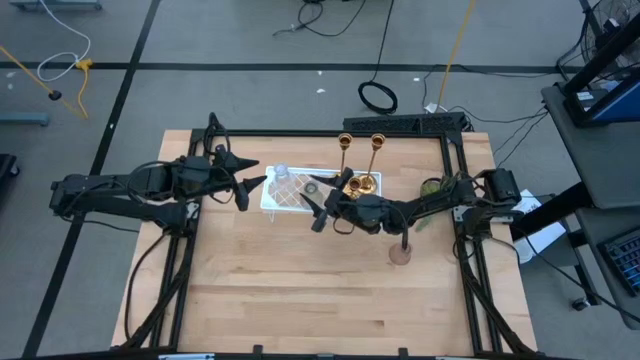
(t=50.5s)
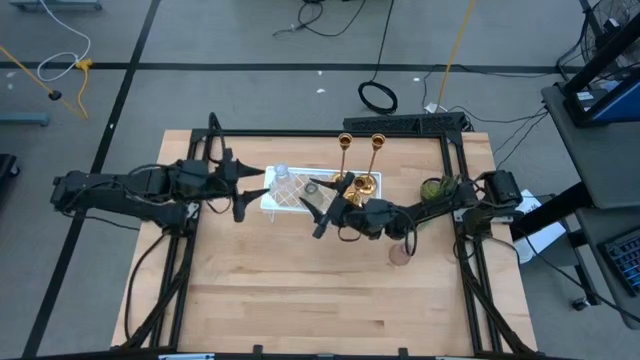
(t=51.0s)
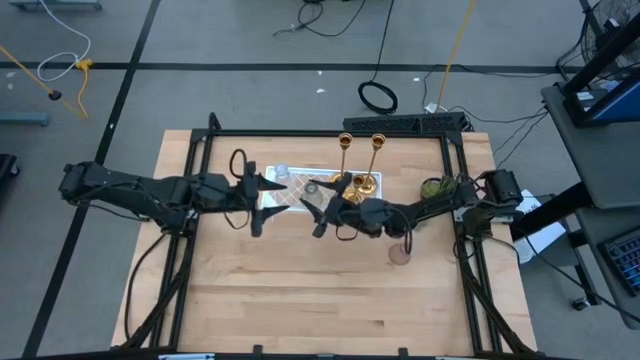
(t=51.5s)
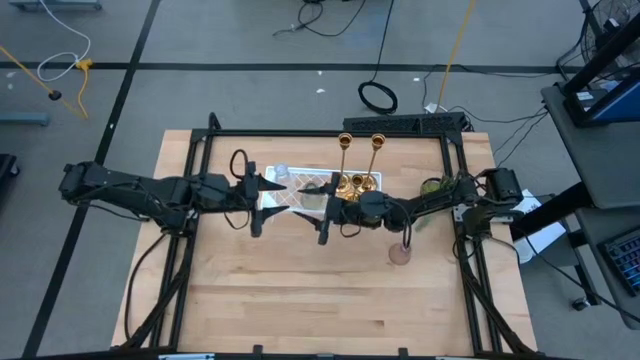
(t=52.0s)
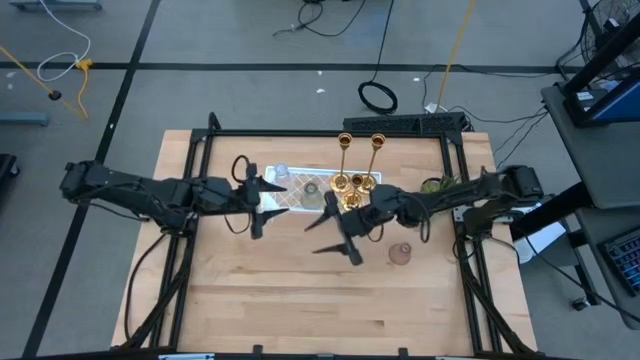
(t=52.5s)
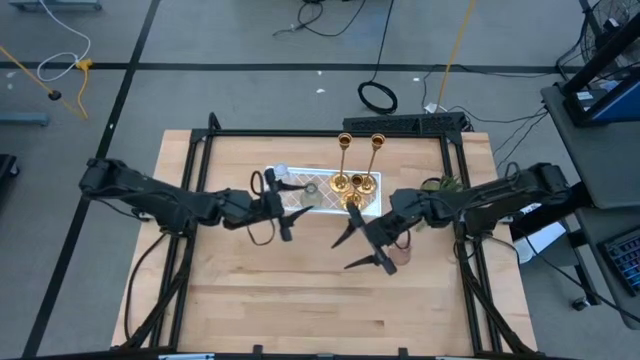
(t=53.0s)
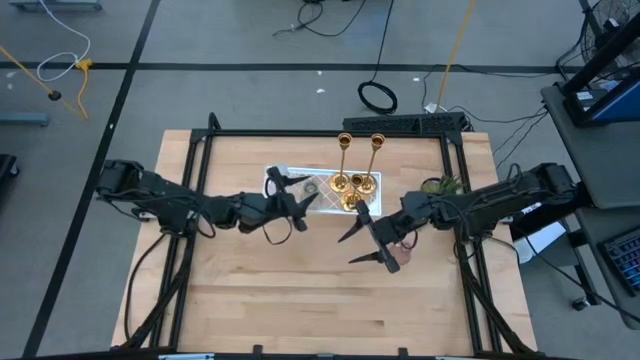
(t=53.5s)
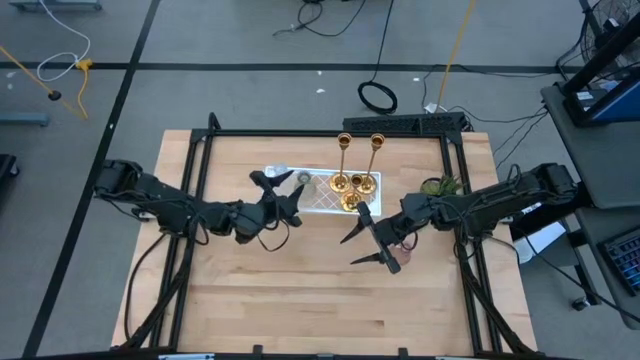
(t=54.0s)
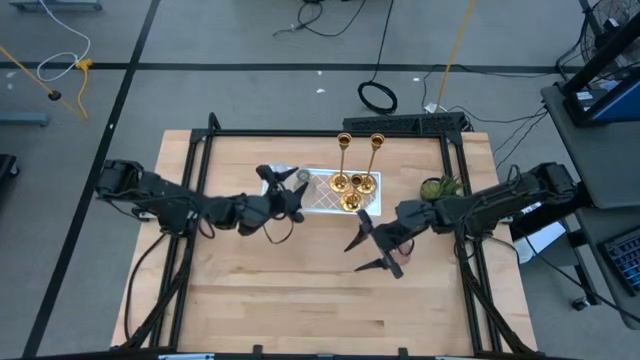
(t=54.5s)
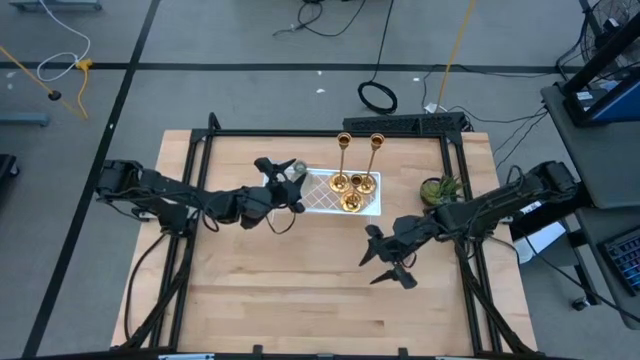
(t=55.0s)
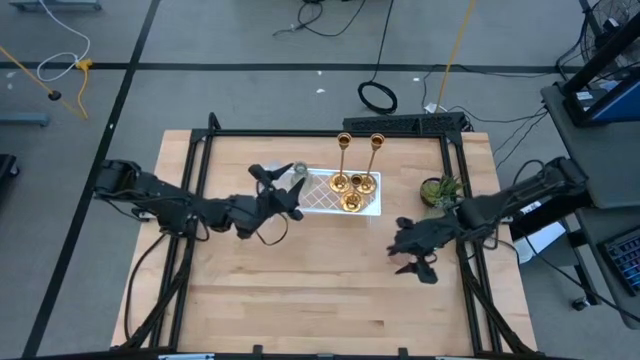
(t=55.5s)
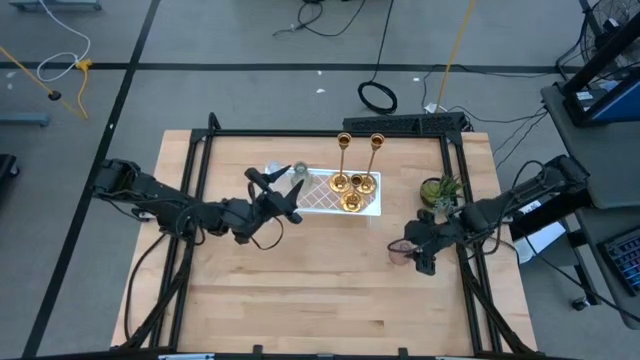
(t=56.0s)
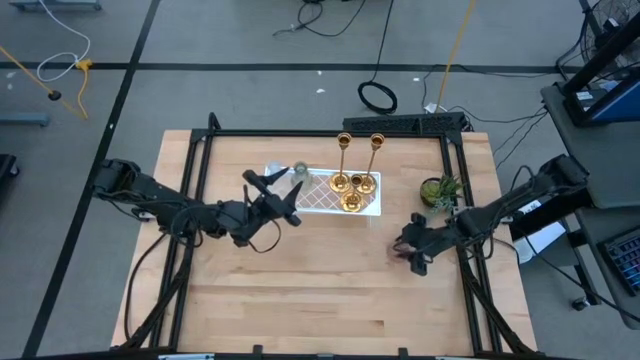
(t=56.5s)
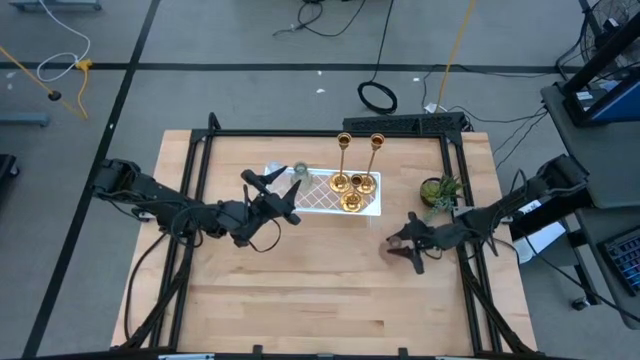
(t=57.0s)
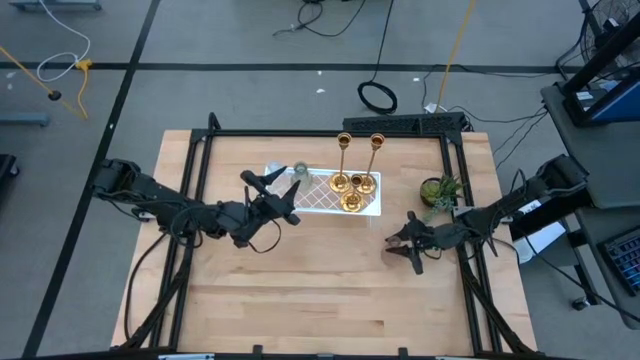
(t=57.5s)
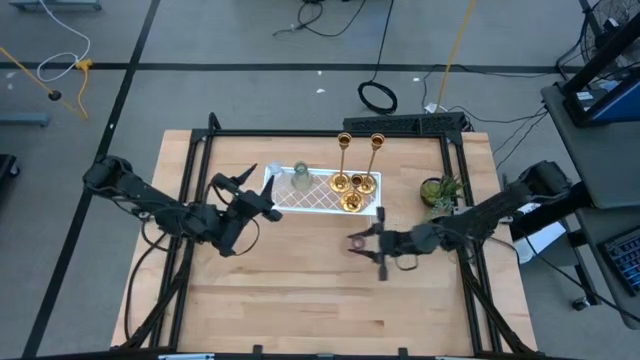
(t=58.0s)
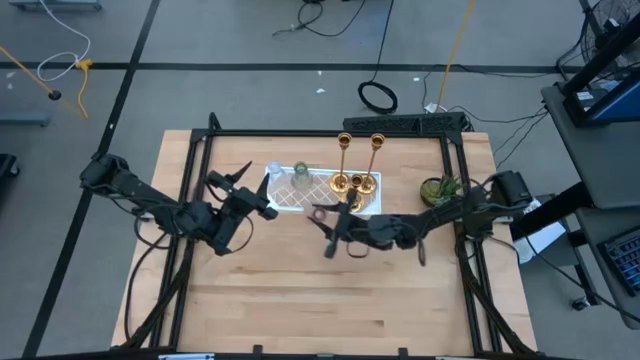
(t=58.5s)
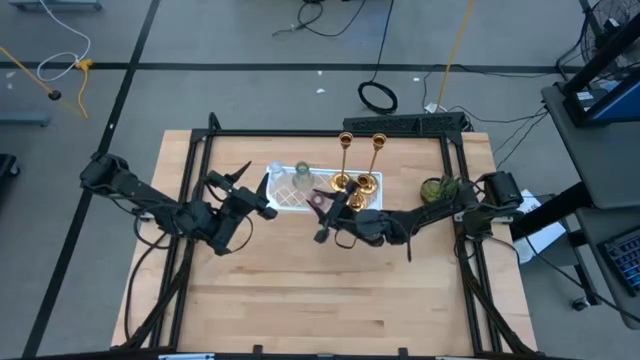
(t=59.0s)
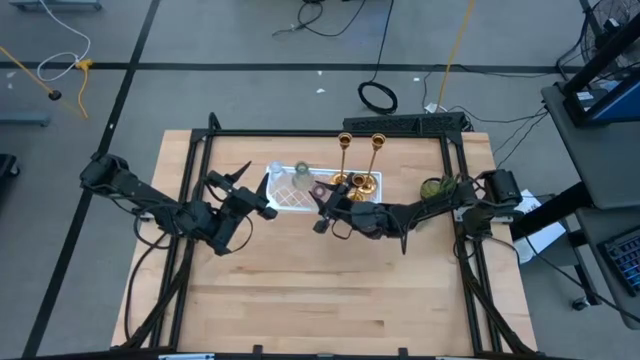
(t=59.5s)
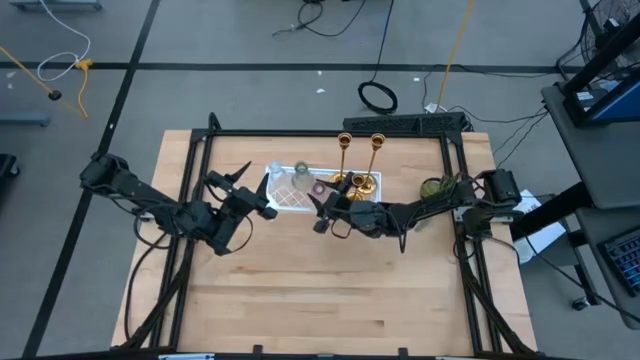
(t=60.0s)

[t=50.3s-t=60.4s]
Task: Pick & Place candle stick holders
Put the red candle holder on the shelf

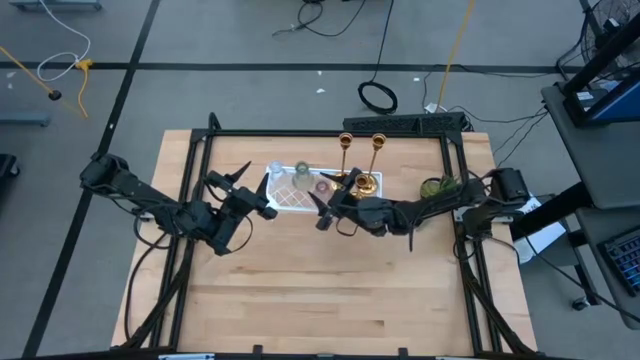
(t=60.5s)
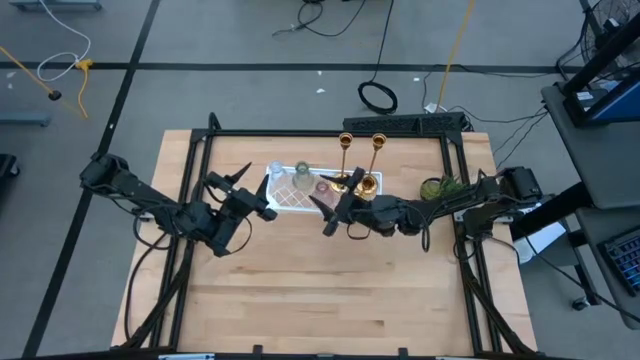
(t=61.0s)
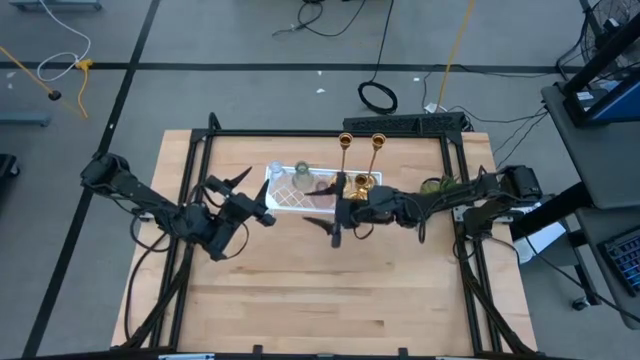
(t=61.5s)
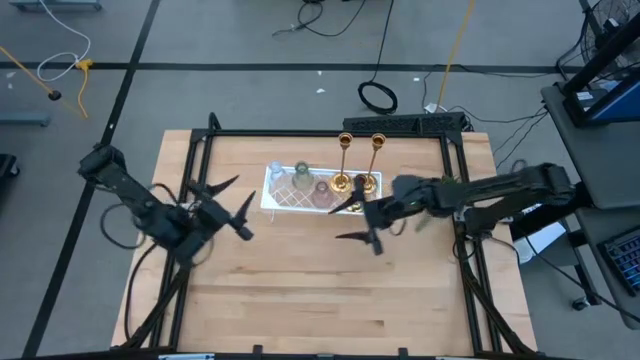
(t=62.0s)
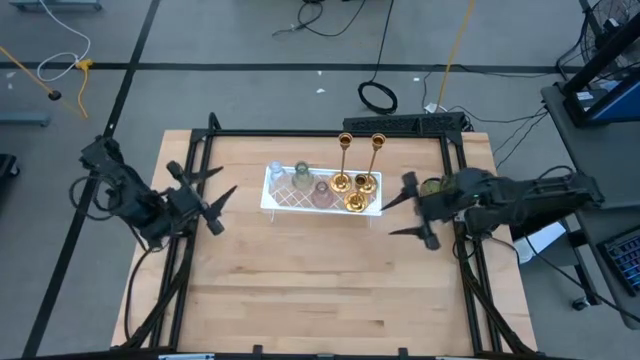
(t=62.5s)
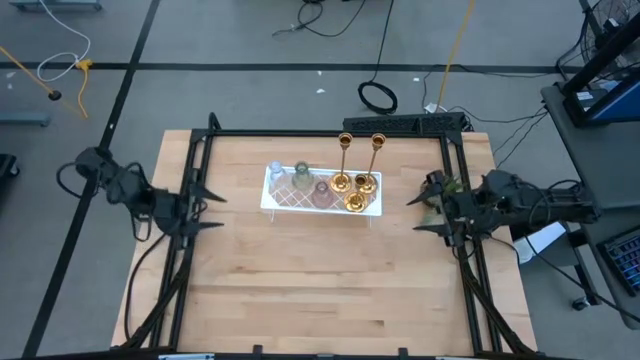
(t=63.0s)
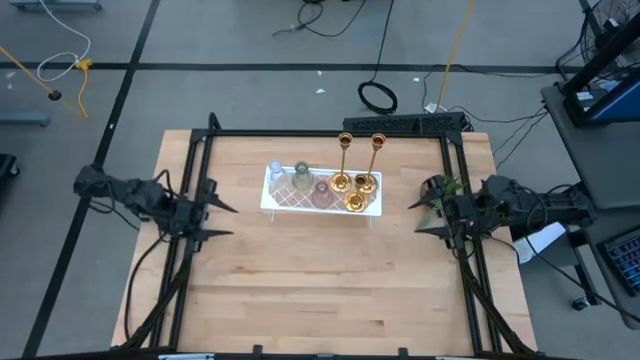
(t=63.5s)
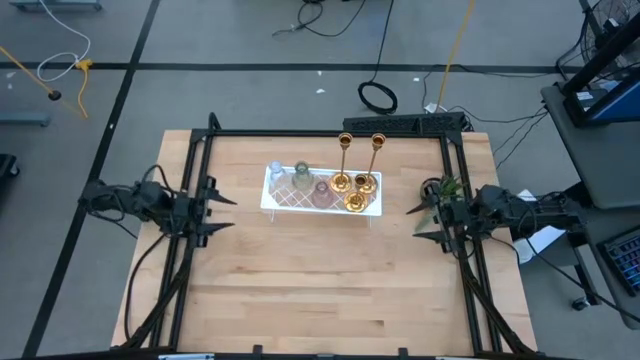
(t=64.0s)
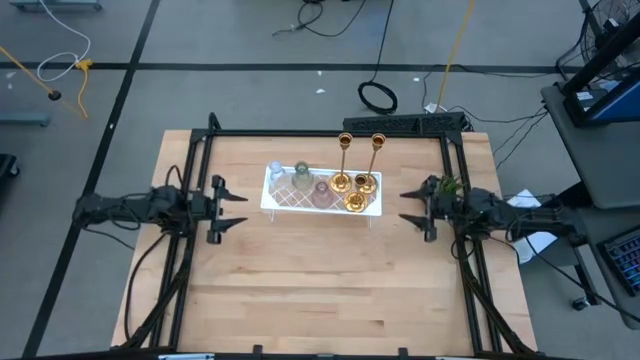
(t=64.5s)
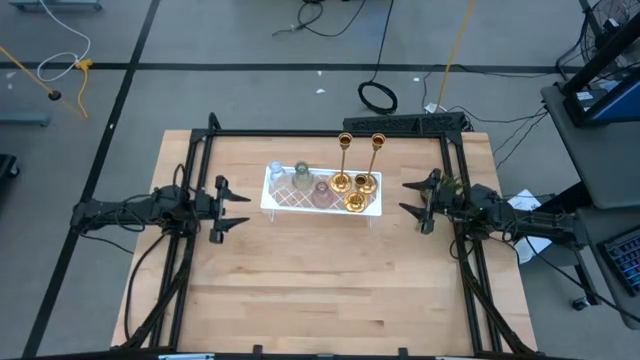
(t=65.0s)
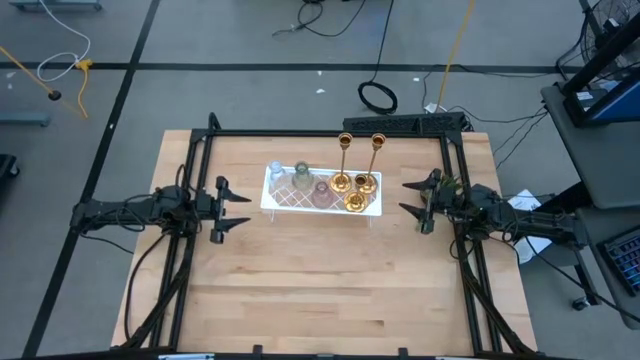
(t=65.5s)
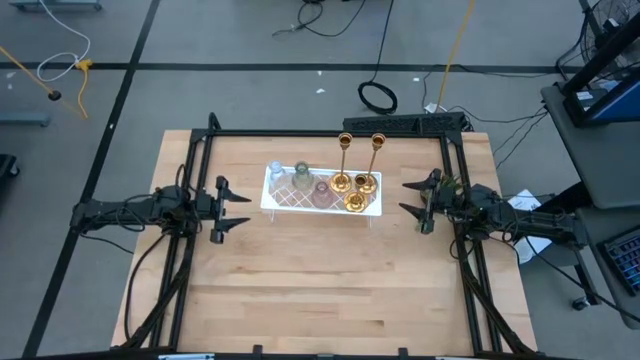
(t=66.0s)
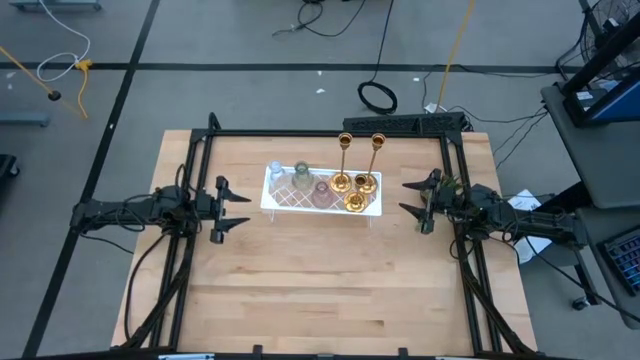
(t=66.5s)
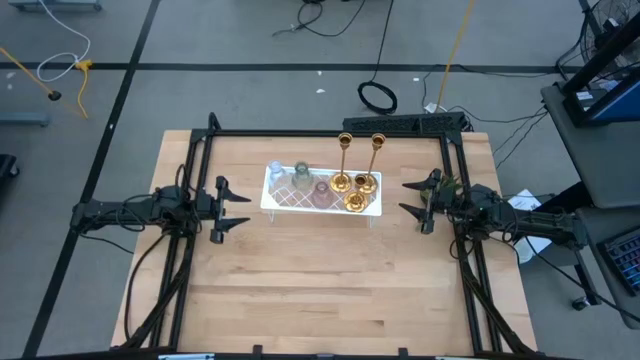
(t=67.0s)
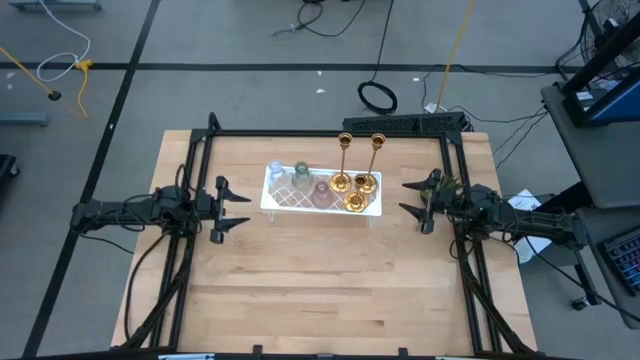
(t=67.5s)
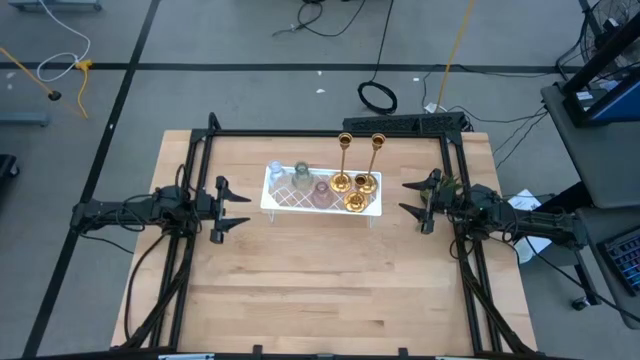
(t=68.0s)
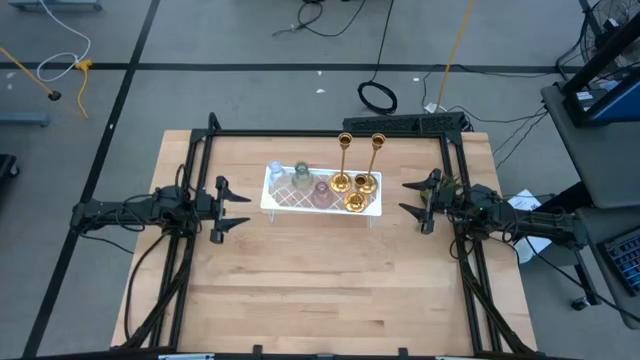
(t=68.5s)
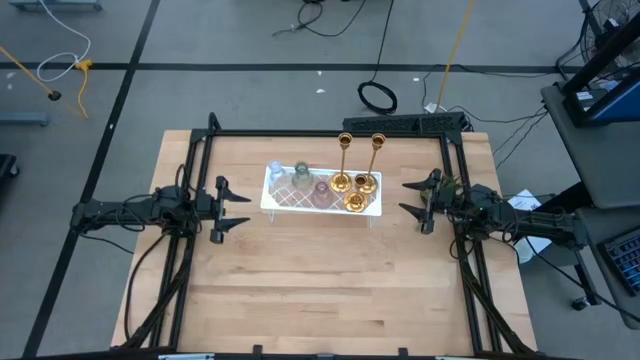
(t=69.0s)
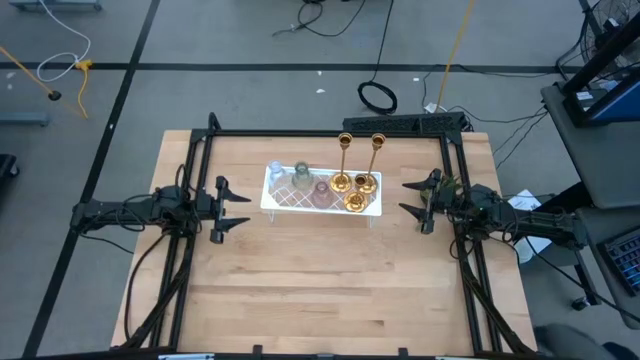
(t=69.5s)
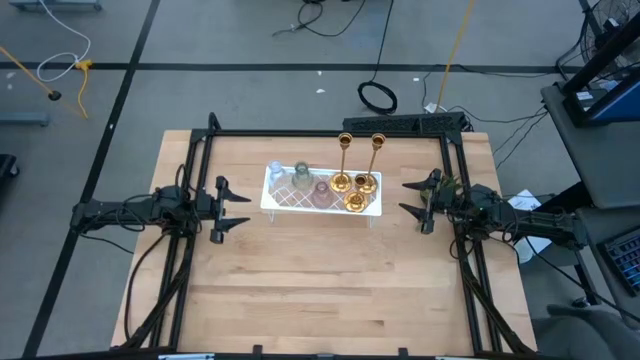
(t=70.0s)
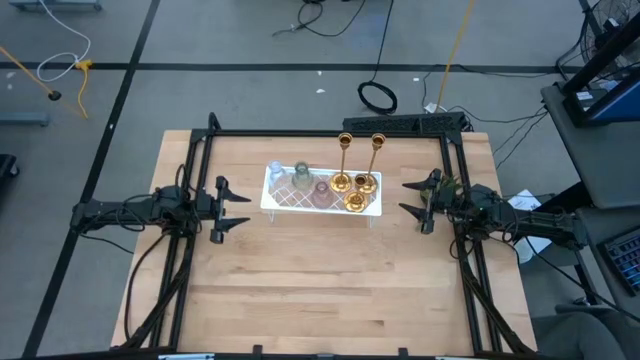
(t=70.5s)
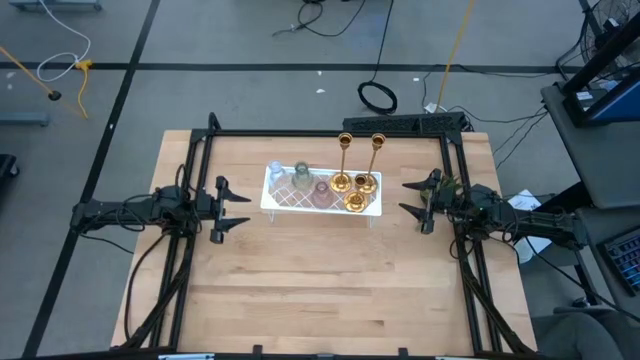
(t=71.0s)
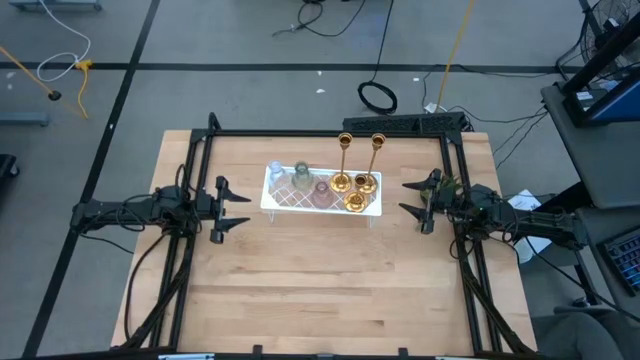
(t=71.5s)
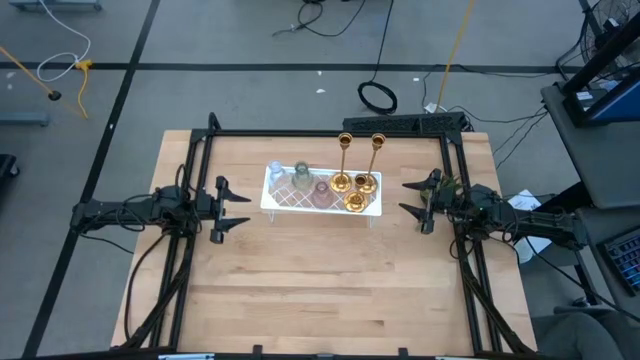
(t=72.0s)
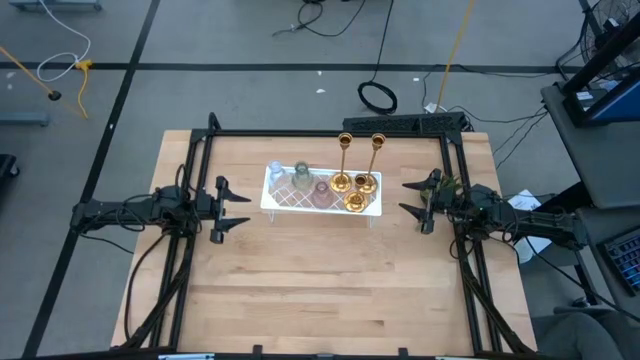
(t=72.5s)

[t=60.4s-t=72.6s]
Return to Home Position
